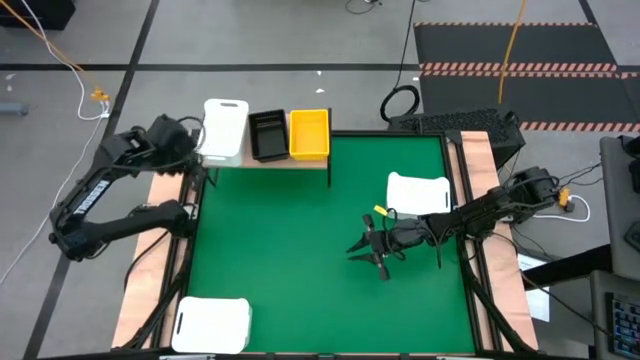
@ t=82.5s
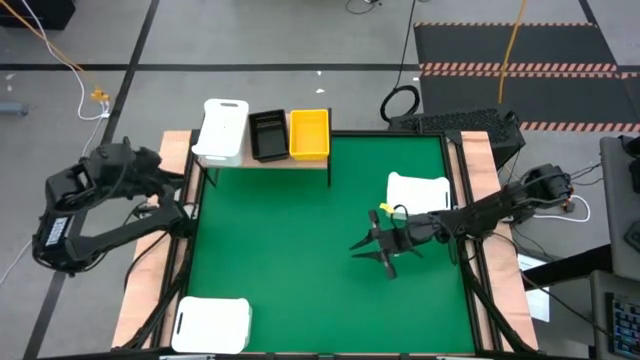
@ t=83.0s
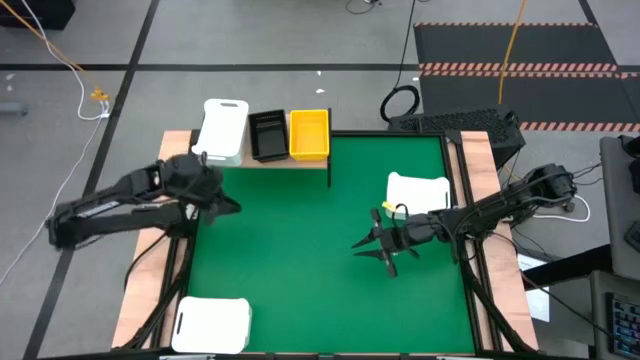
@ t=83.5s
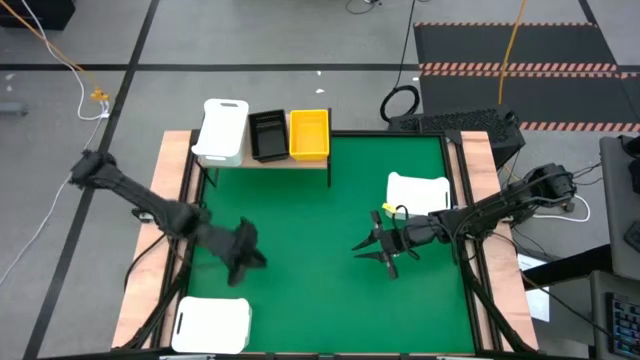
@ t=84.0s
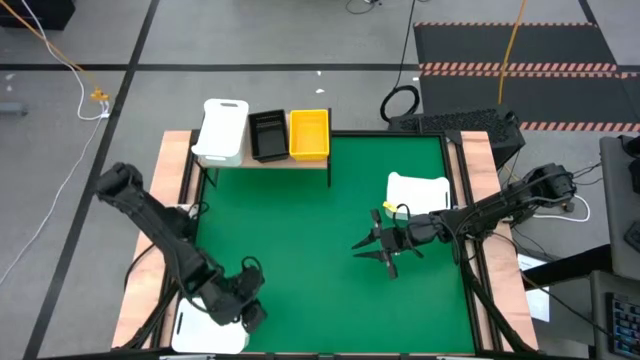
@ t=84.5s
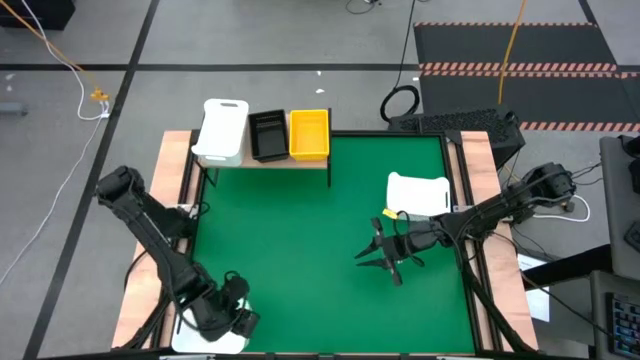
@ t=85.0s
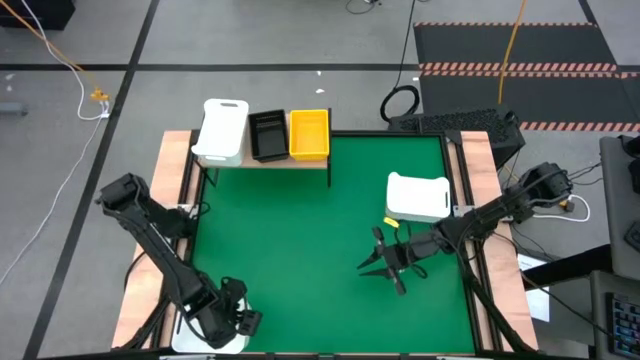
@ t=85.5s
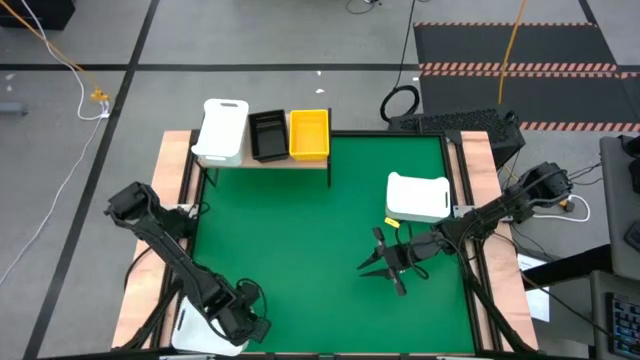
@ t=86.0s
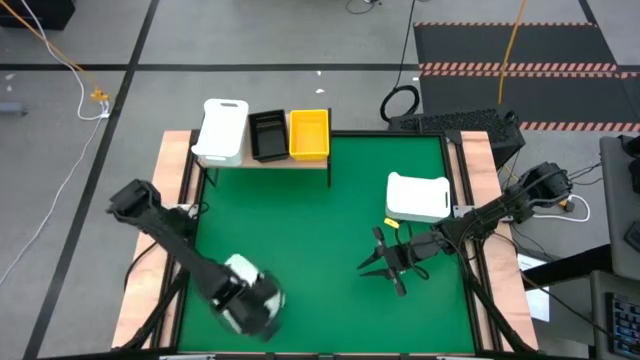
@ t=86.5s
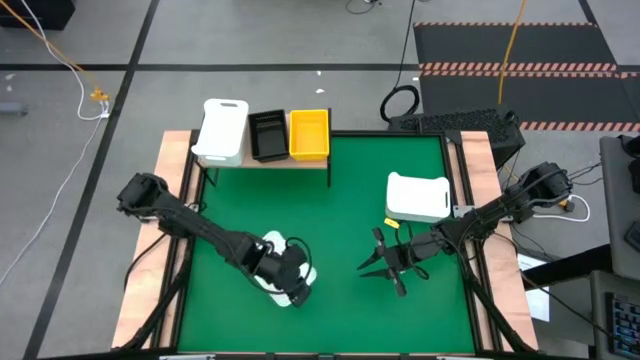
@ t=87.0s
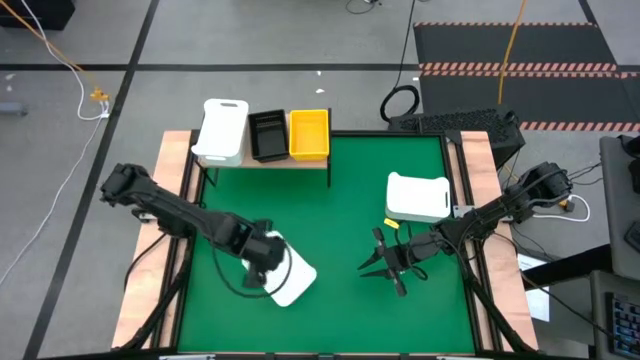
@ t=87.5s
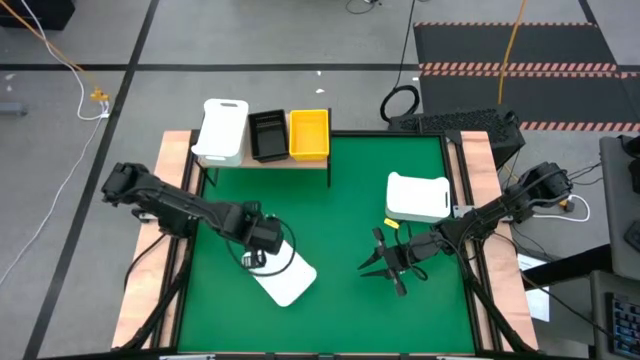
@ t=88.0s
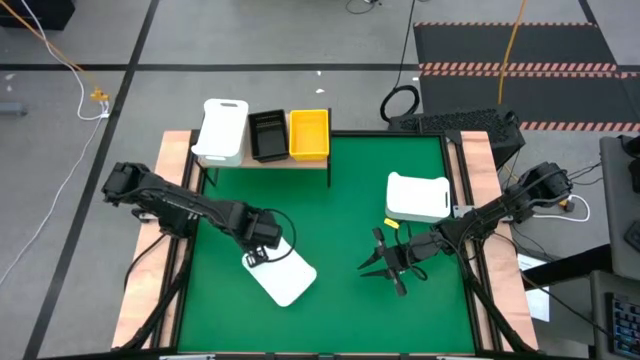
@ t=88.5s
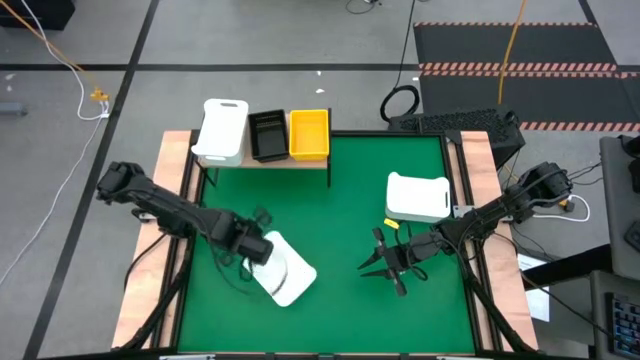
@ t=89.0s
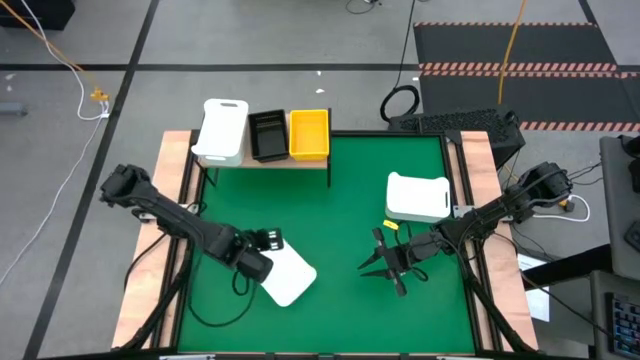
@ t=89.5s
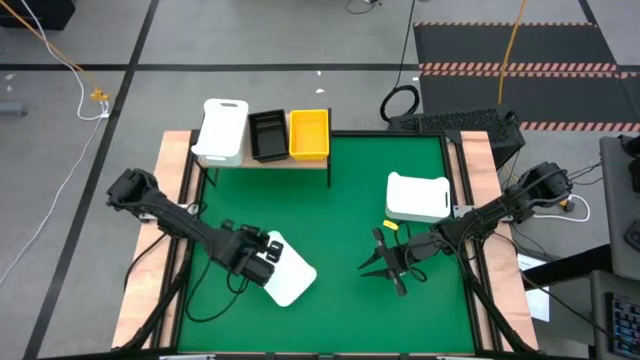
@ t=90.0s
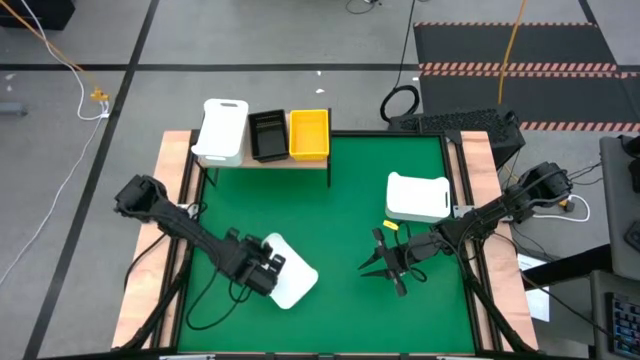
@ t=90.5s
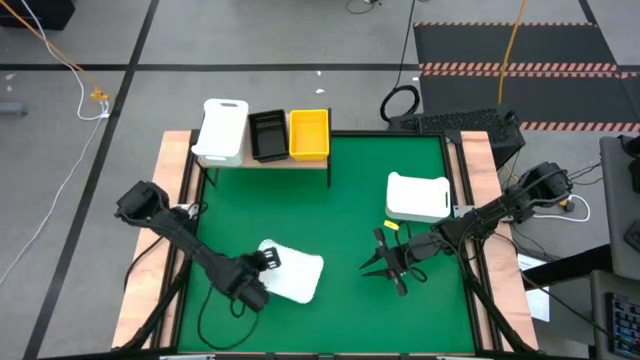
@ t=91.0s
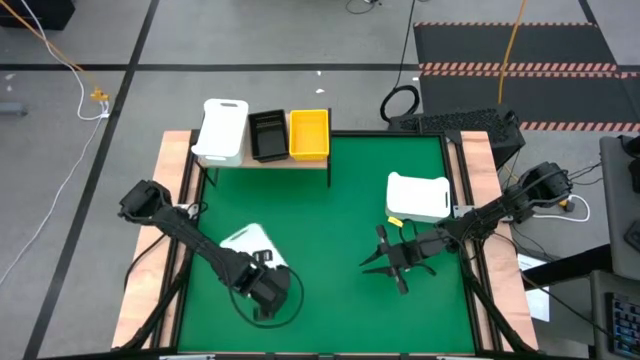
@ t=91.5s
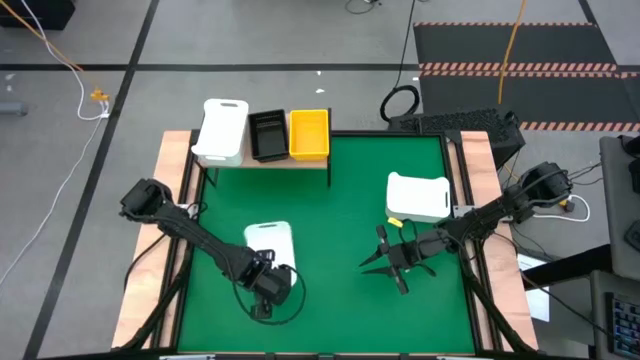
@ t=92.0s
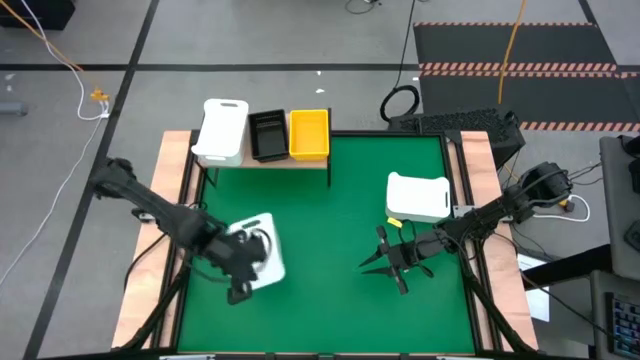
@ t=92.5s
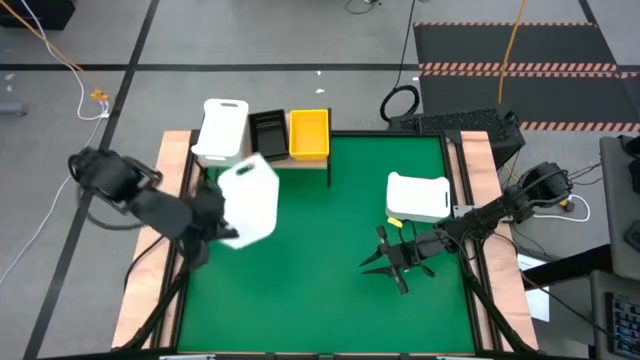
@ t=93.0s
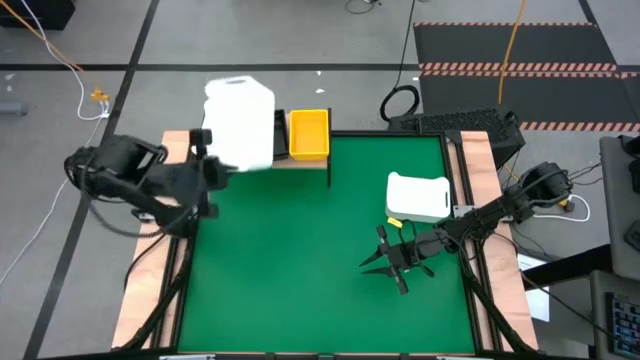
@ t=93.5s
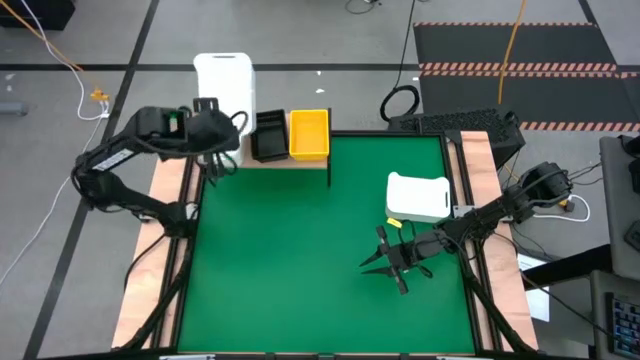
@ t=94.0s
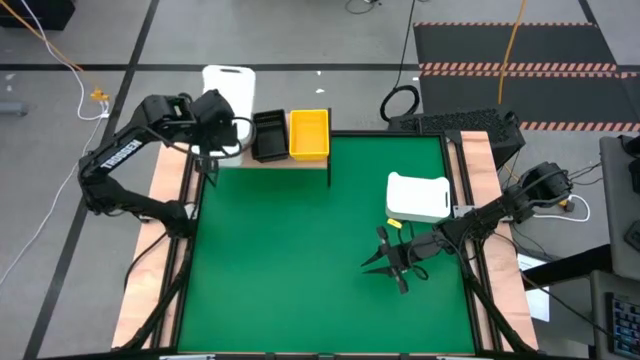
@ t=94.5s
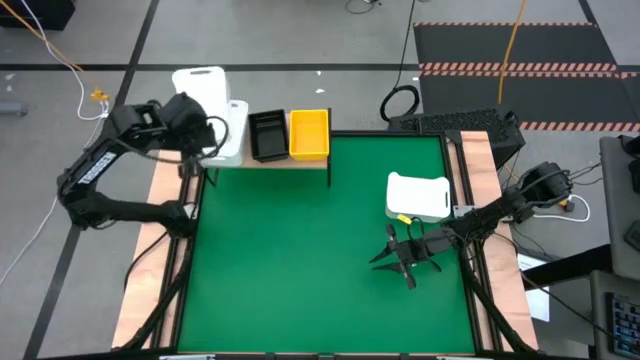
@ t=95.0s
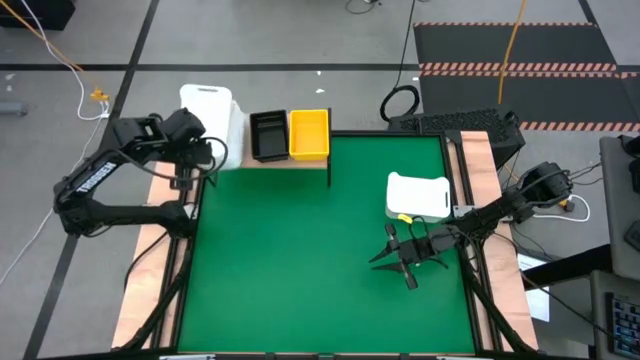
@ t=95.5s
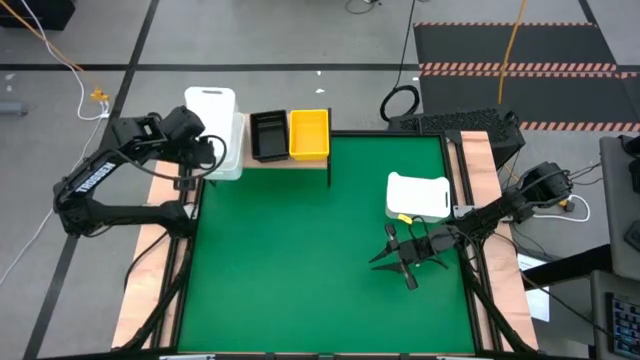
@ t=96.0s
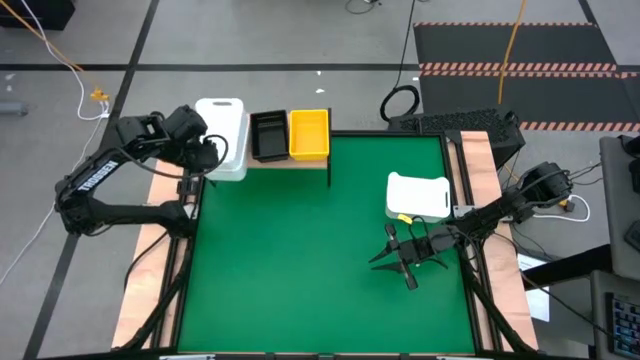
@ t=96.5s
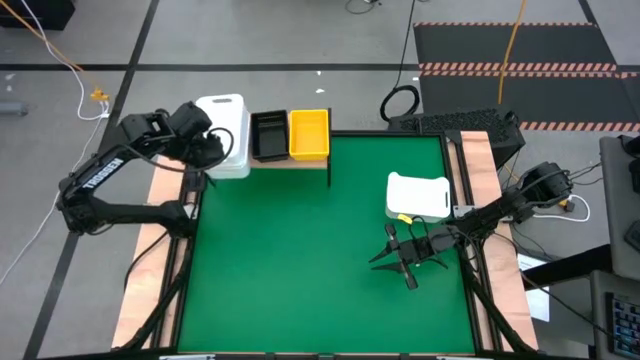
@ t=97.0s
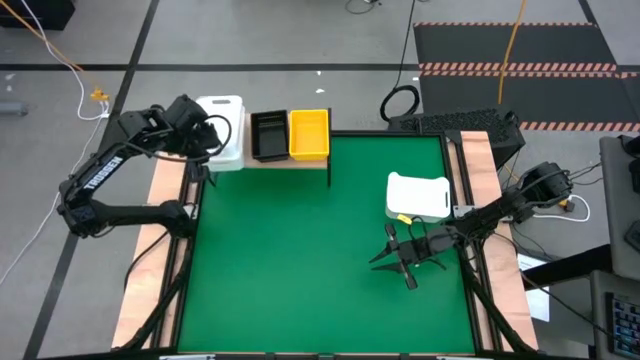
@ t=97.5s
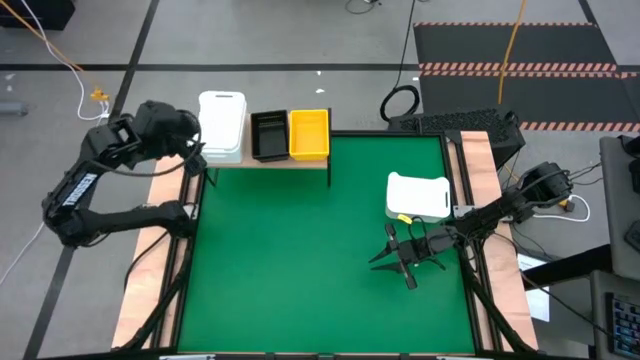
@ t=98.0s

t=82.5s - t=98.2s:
Task: Stack baskets on shelf by color
Stack the bottom white bin on top of the other white bin on the shelf

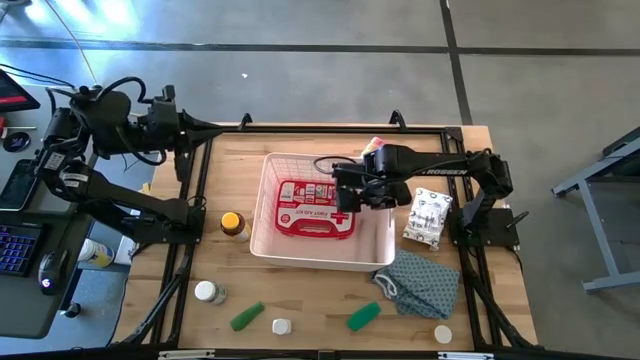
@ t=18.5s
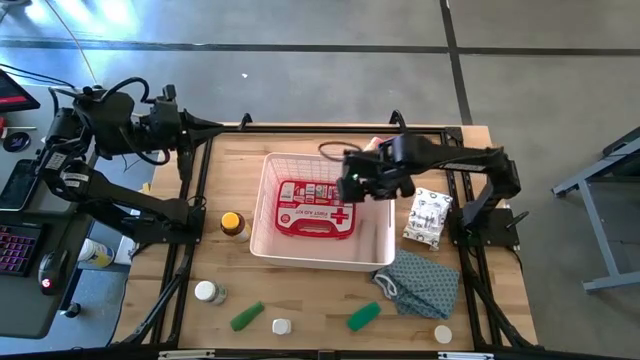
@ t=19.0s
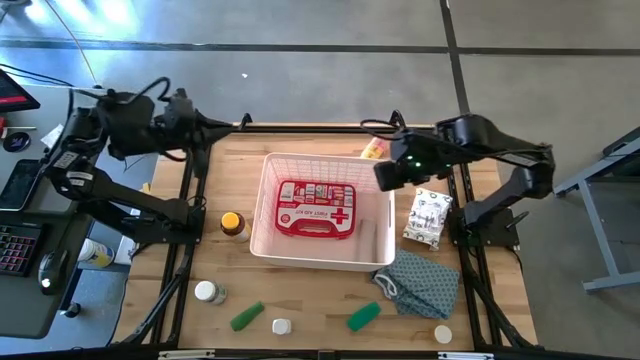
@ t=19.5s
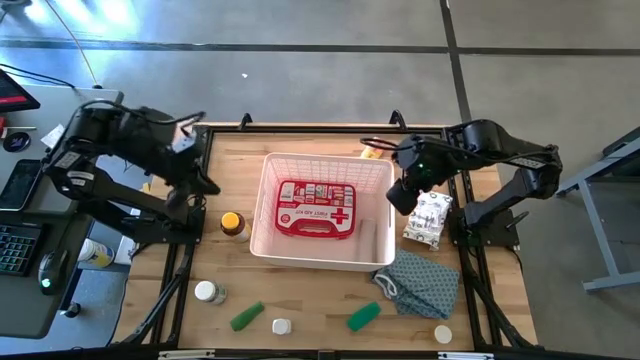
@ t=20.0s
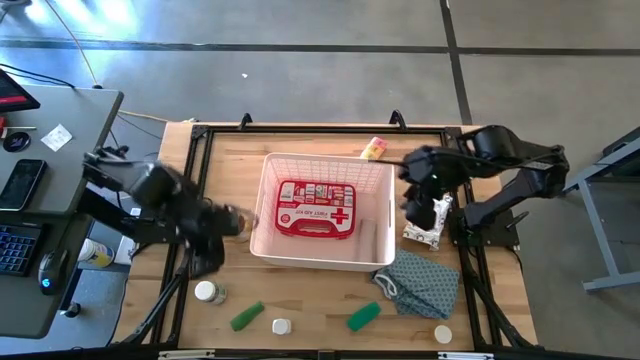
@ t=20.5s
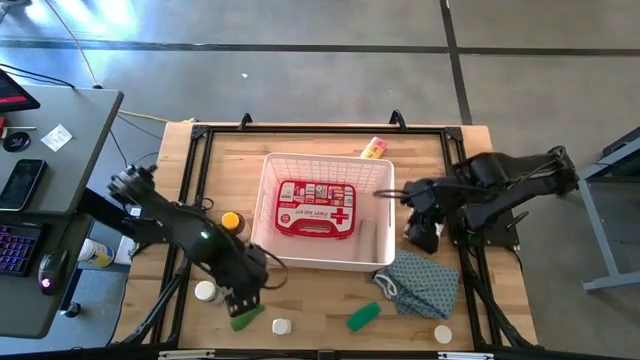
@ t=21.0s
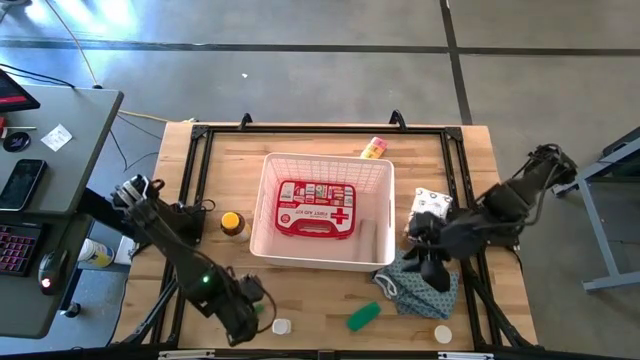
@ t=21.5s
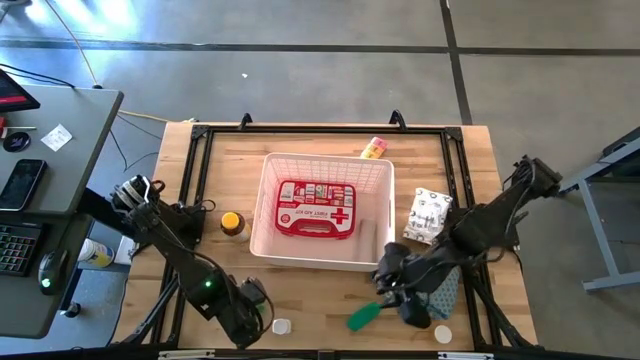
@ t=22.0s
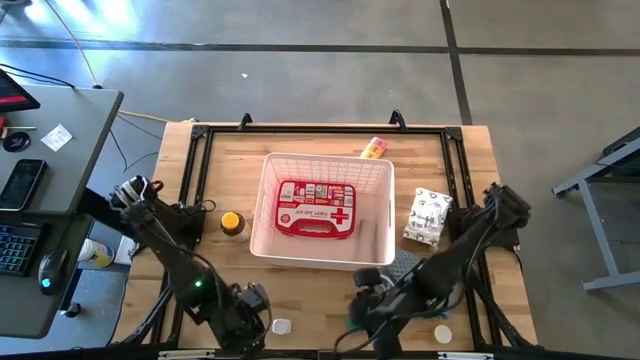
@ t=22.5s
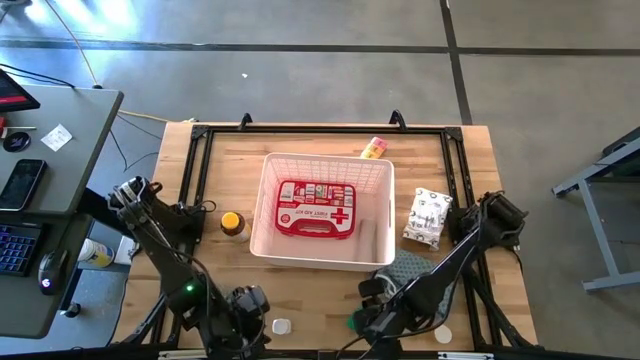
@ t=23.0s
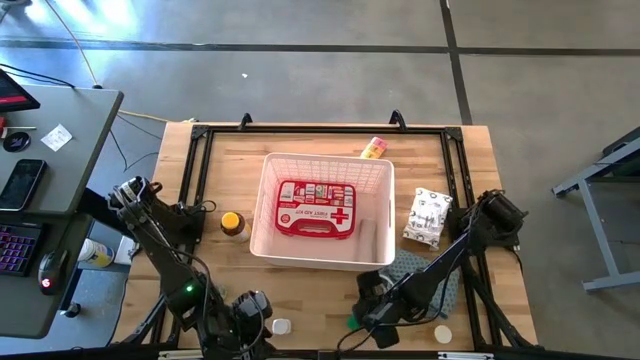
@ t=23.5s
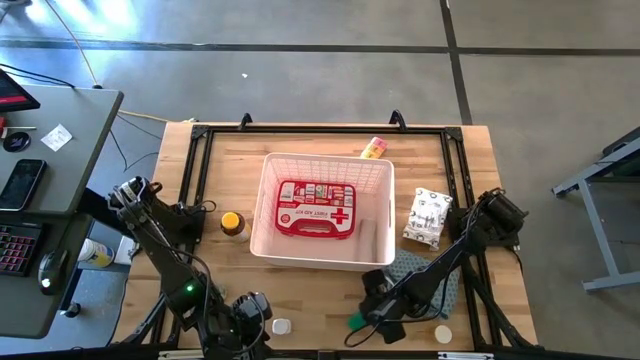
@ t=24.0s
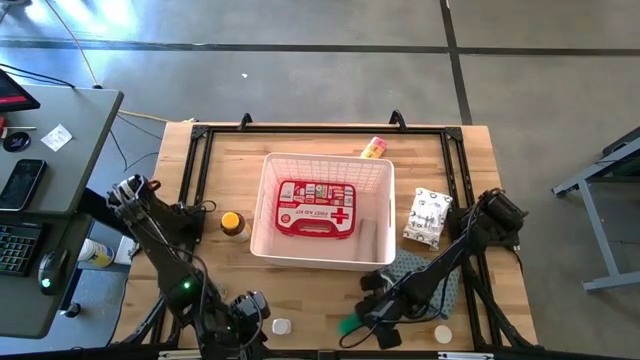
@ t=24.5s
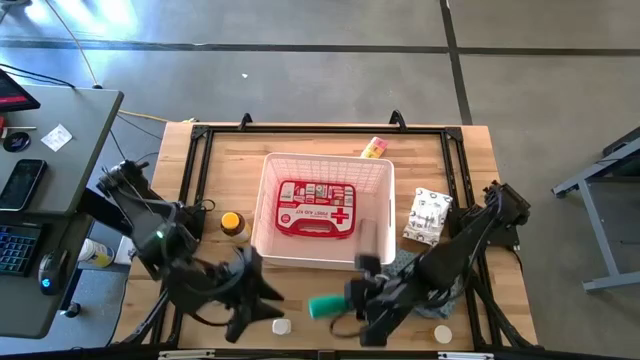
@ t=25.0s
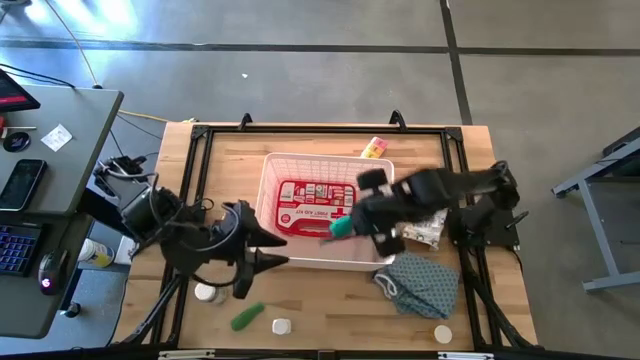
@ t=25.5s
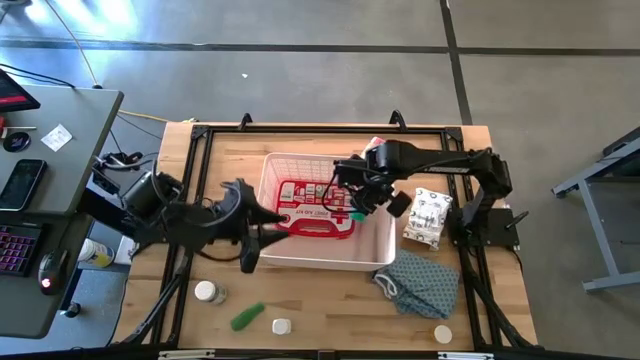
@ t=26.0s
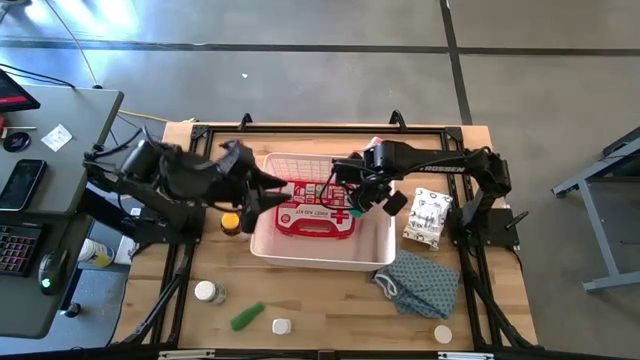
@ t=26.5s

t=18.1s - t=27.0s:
Task: Pick & place medical supplies in basket/bin
Put the right rolled green bandage into the white container
